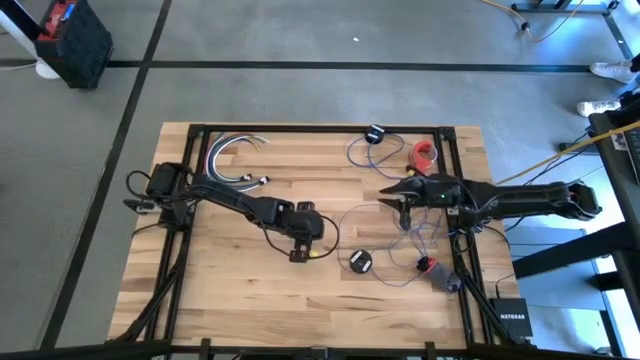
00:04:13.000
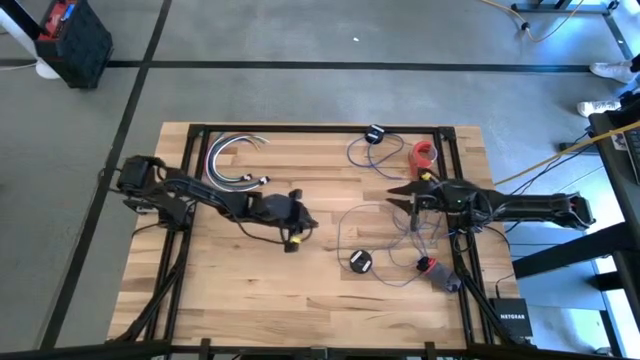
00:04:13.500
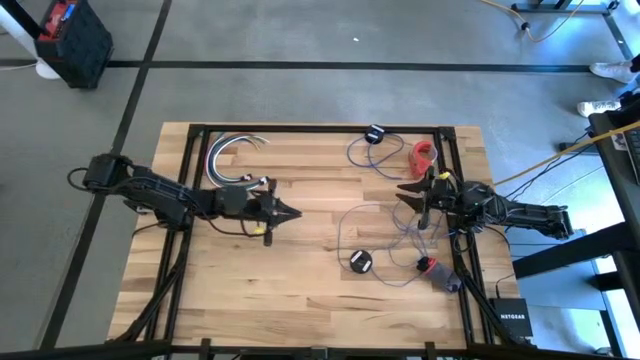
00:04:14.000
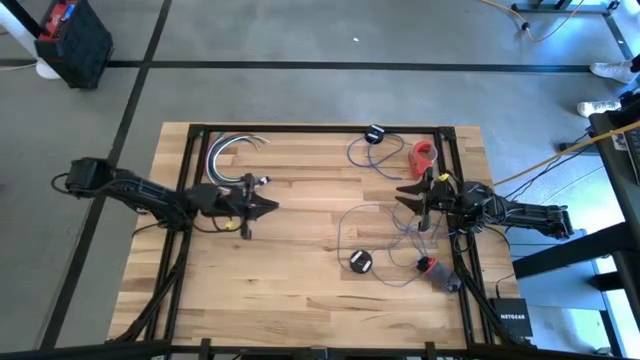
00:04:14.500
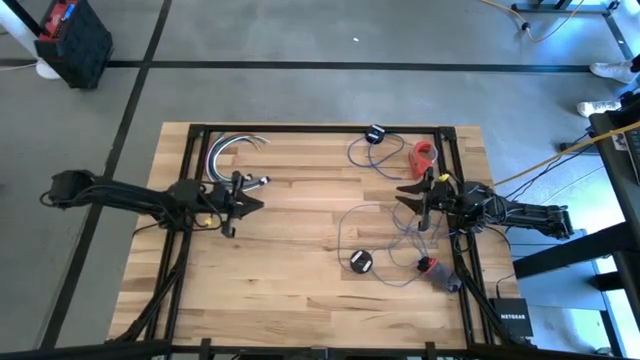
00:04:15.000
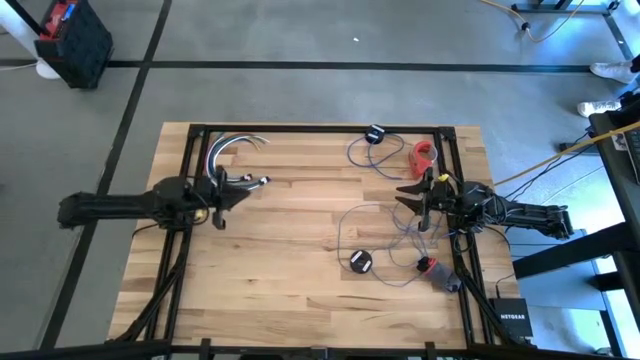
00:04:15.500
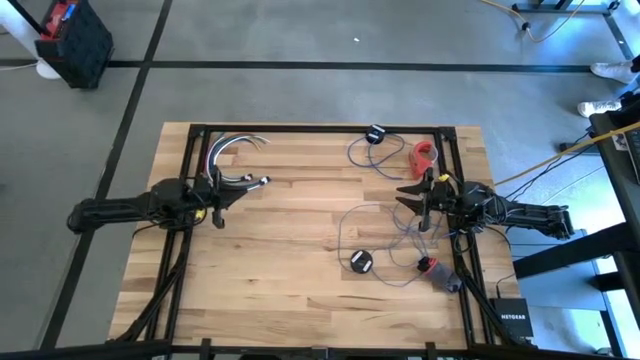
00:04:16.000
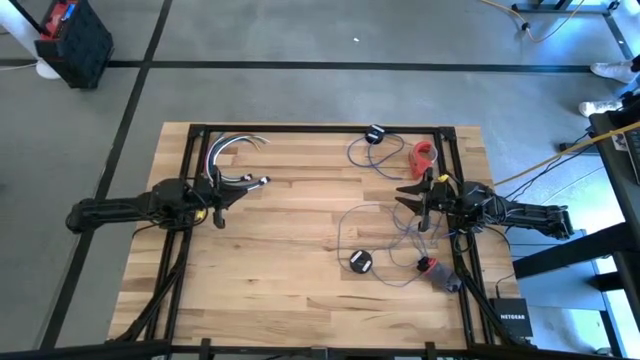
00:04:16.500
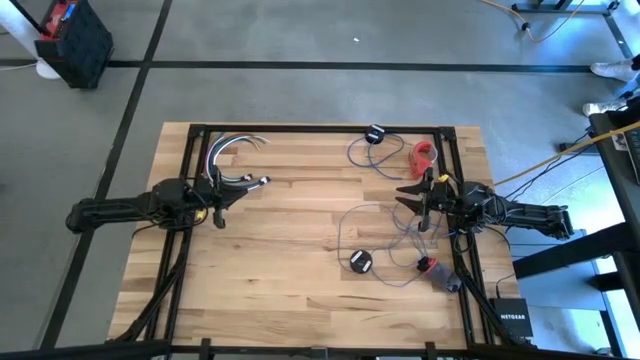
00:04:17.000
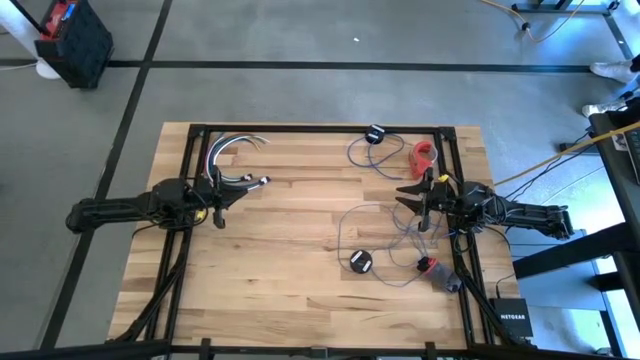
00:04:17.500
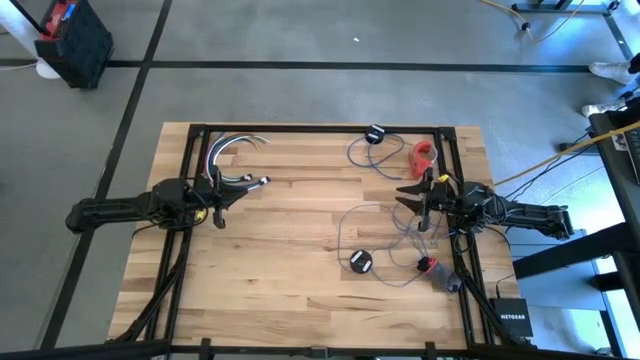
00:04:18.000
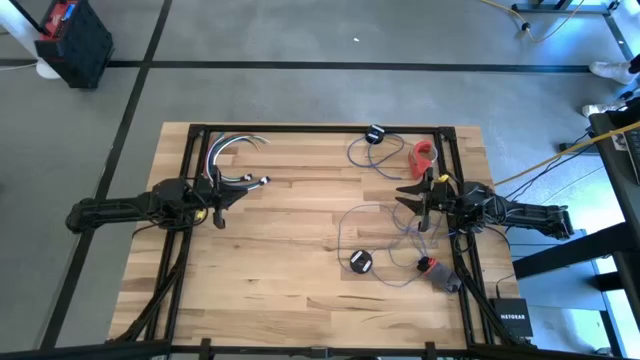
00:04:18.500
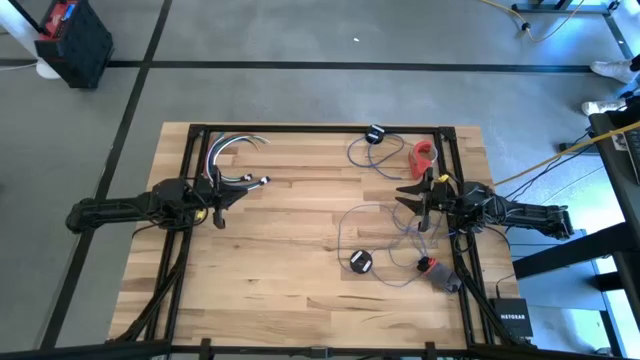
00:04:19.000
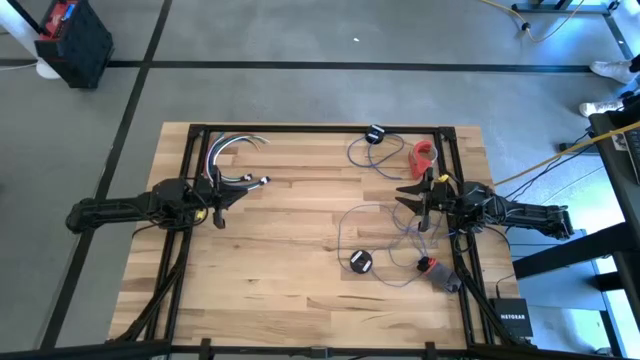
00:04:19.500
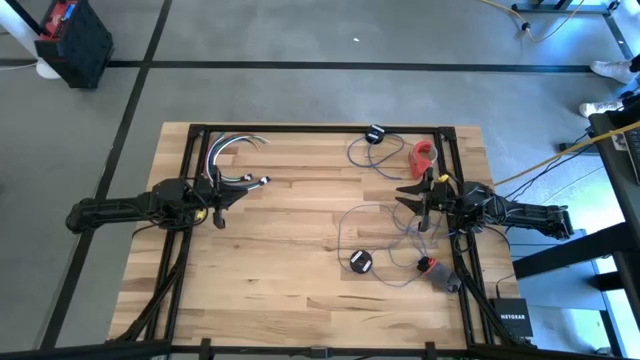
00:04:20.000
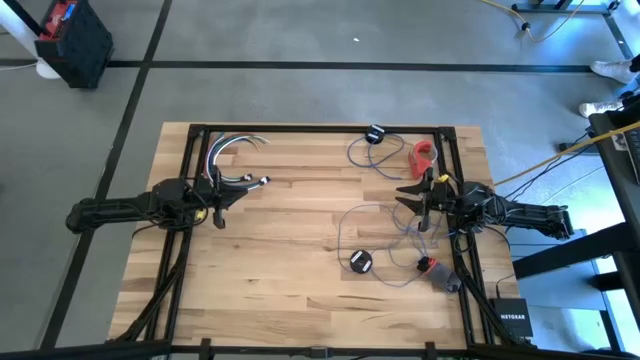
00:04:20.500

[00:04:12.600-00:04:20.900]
Task: Coil cords
Return to Home Position

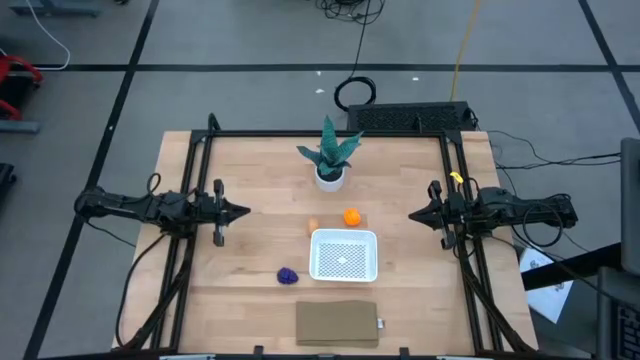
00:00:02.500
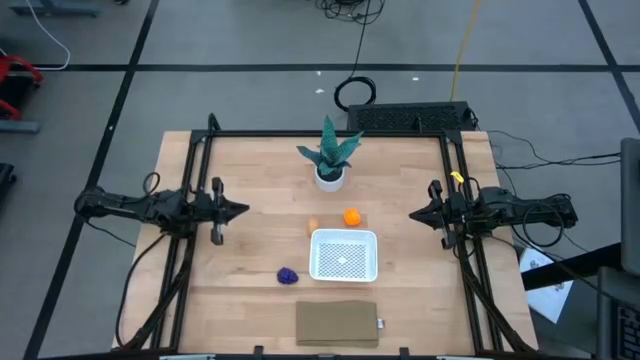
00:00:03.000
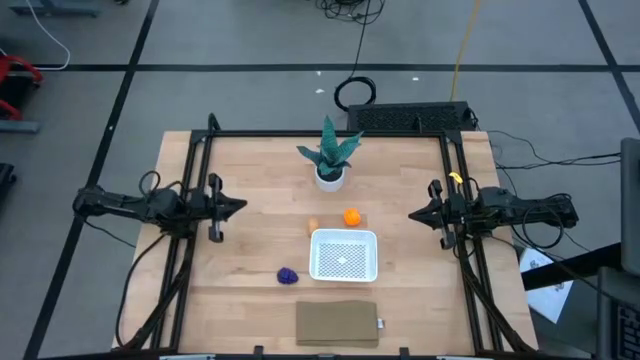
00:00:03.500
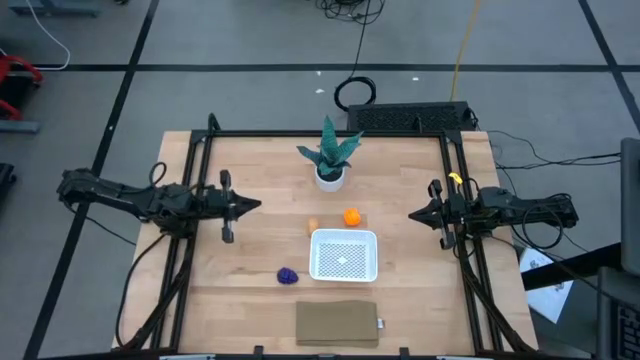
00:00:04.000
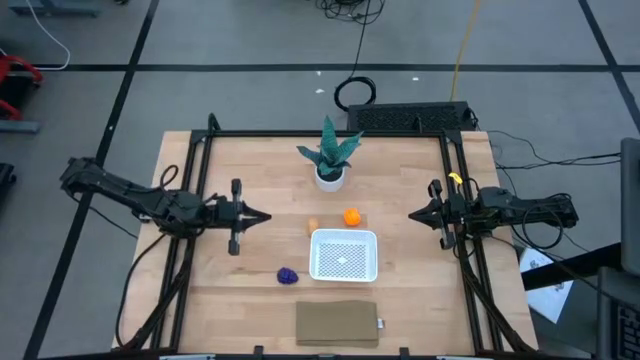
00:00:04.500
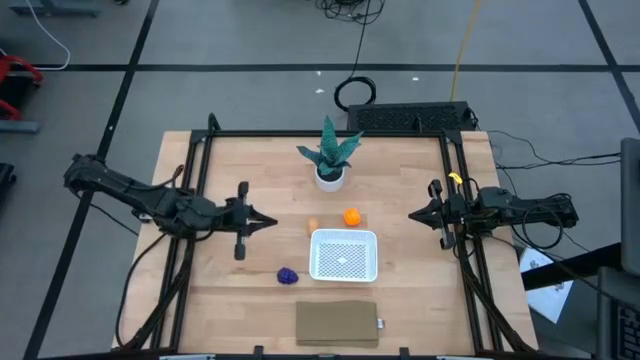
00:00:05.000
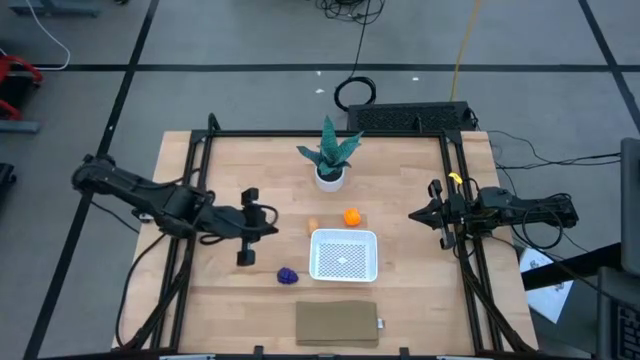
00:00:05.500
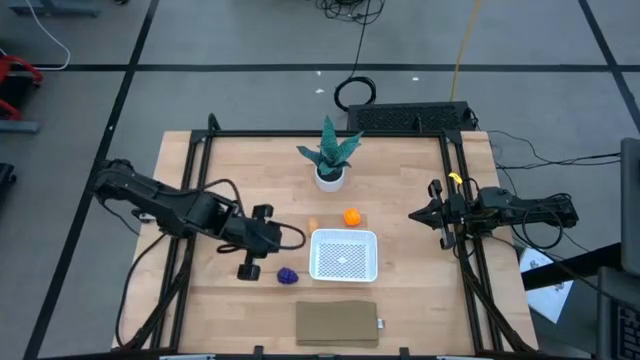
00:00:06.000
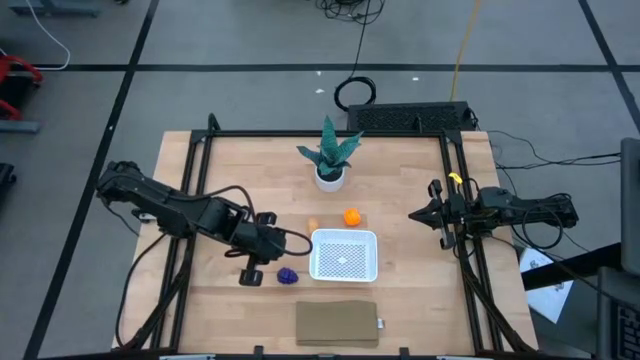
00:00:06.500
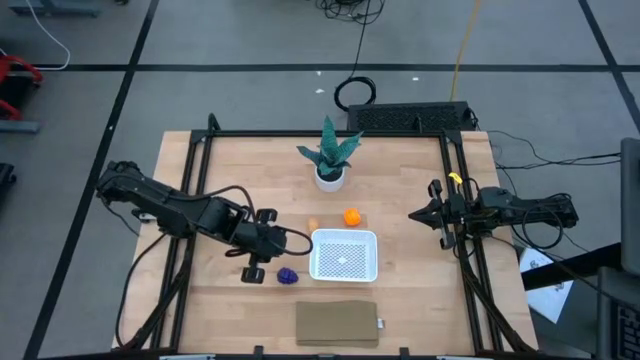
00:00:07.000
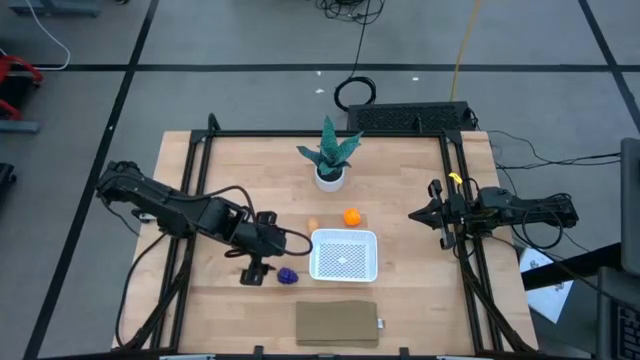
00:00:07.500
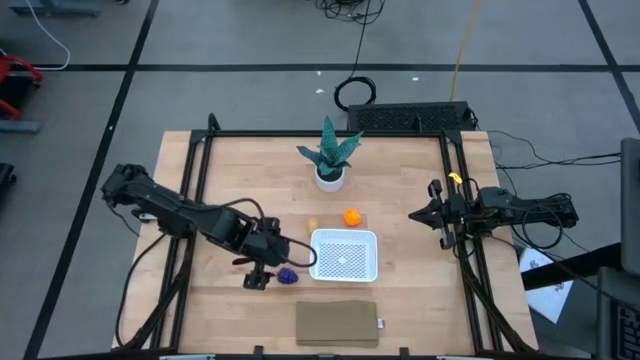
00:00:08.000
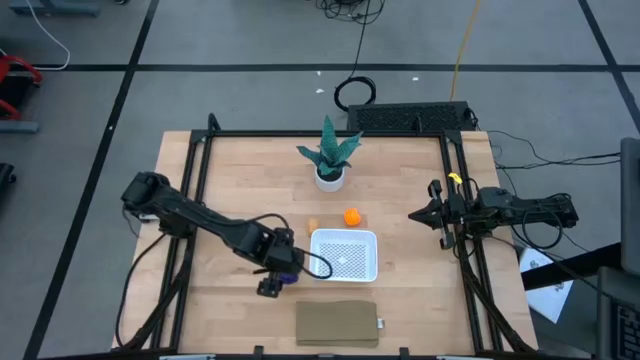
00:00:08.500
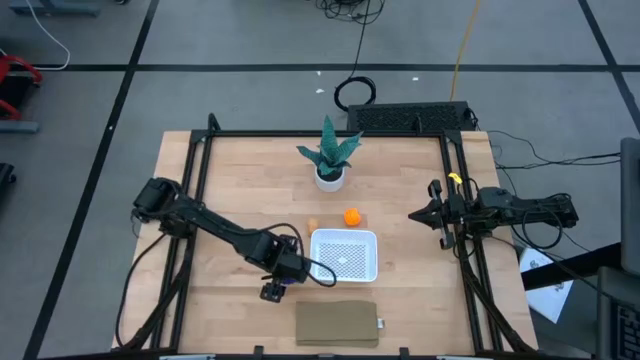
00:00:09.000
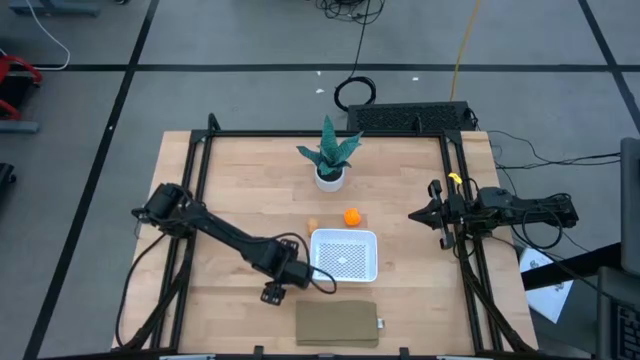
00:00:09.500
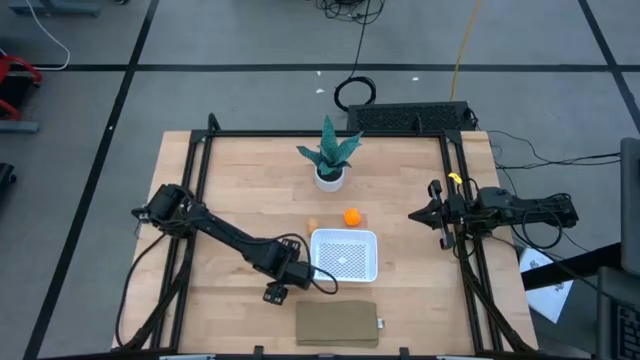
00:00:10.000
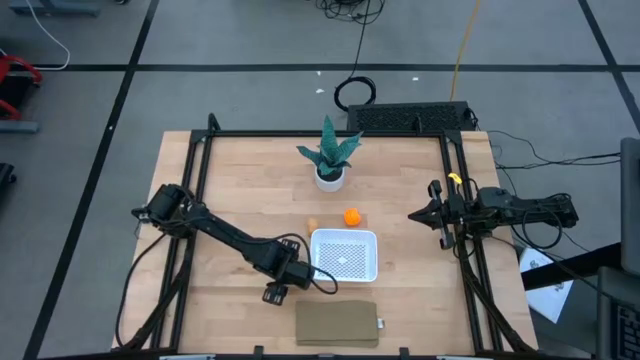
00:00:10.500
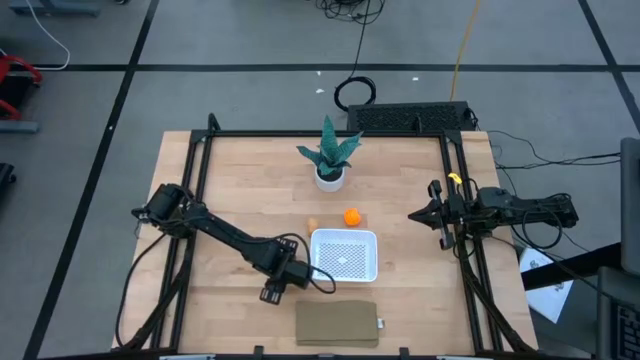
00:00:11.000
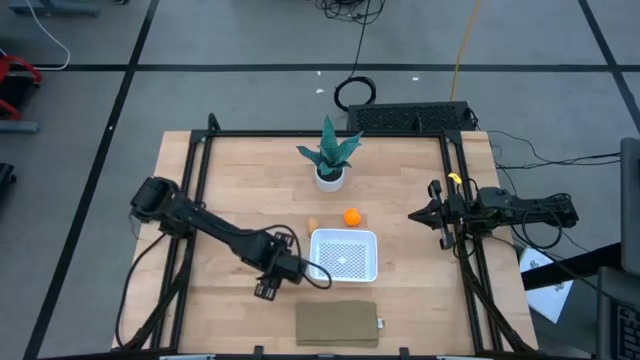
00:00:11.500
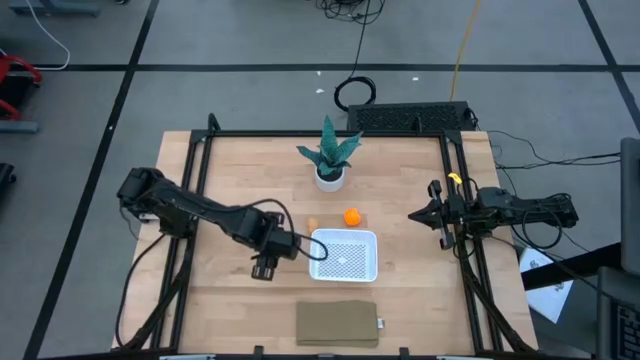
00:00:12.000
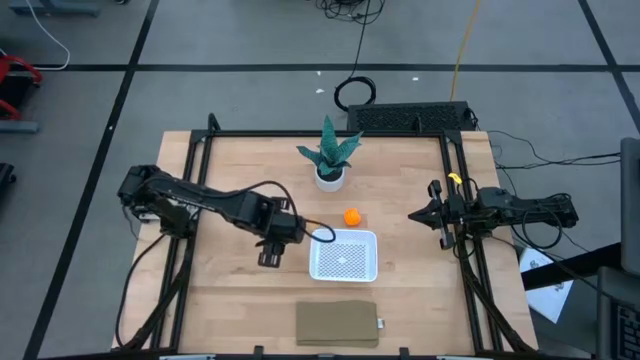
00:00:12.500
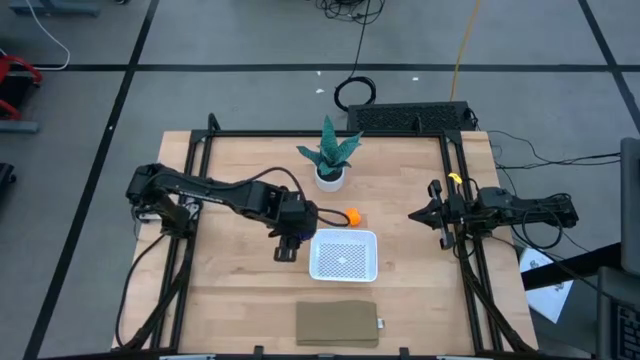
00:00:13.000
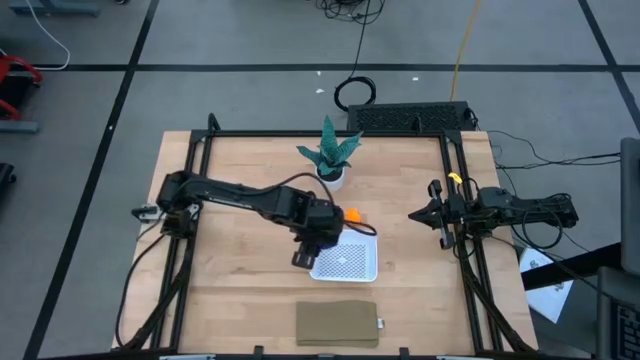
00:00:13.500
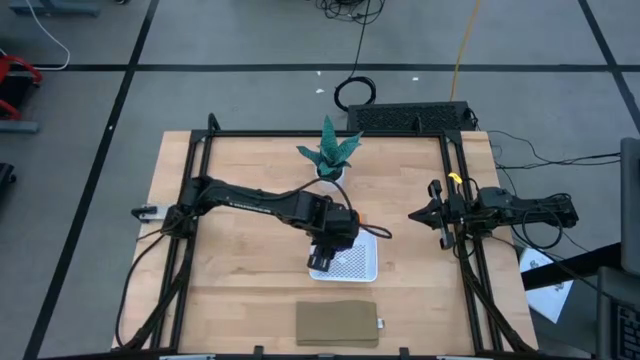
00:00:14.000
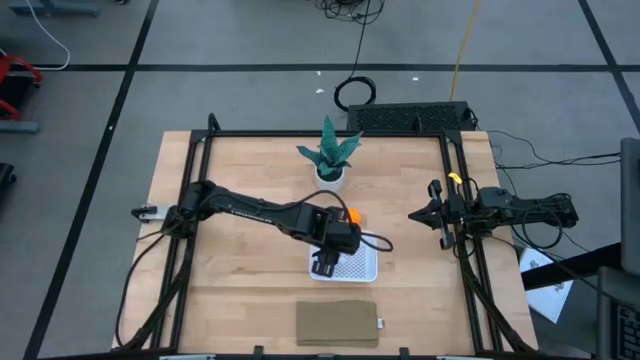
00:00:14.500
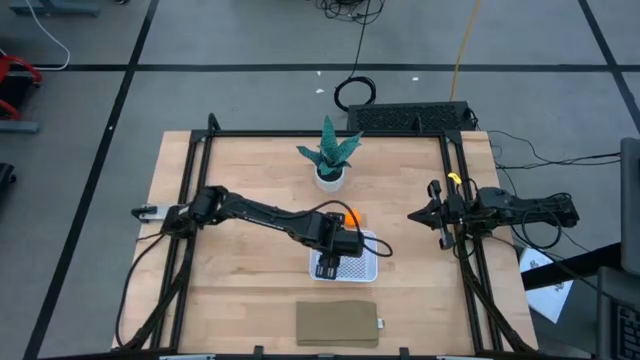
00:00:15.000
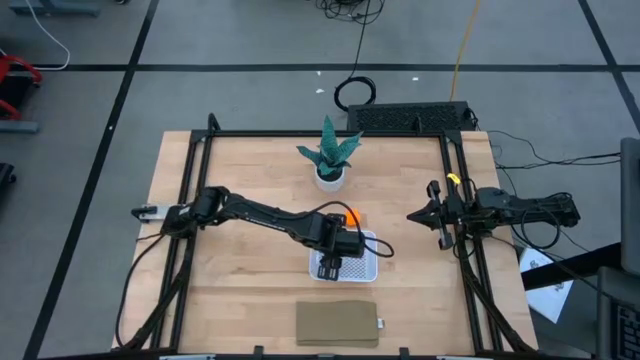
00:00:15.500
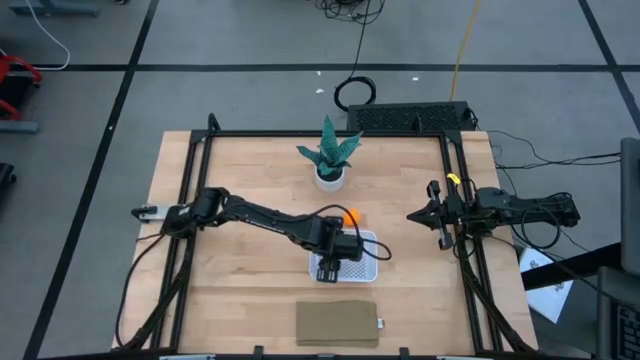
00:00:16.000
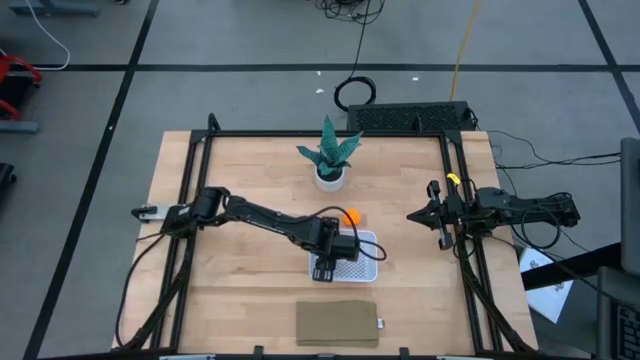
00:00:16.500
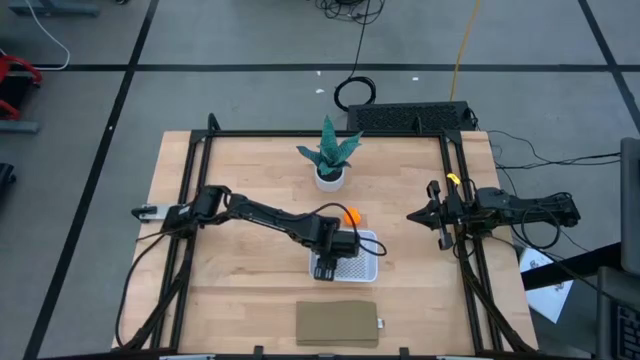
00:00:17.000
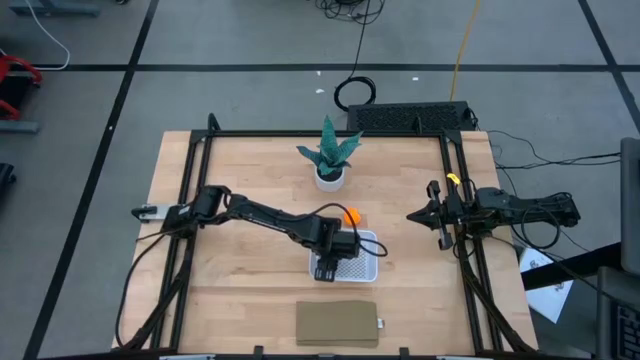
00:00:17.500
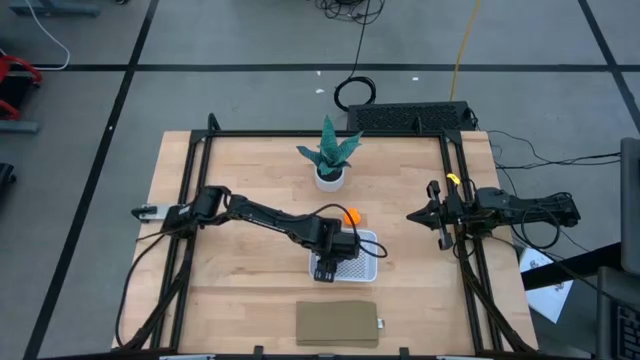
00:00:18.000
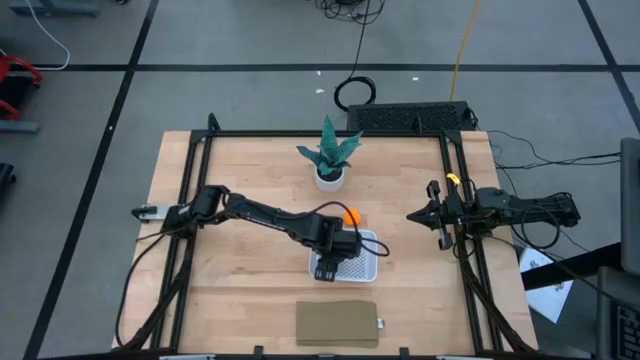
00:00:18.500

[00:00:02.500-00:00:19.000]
Task: Pick and placing Produce into tupperware
Put the purple grapes into the white bin
